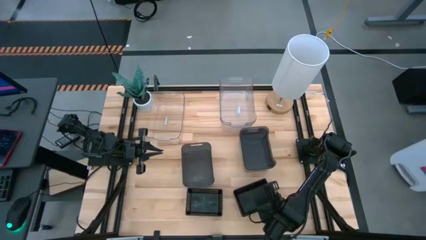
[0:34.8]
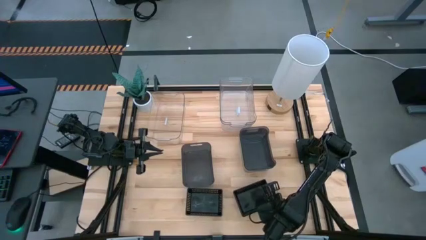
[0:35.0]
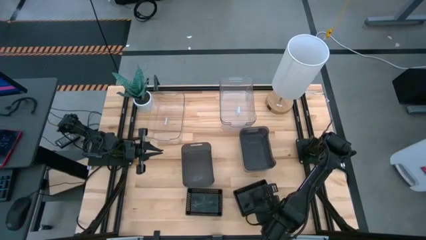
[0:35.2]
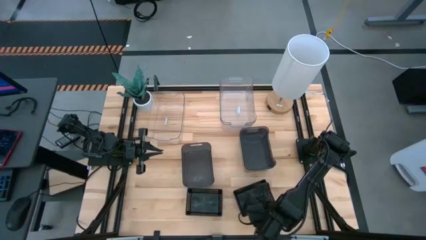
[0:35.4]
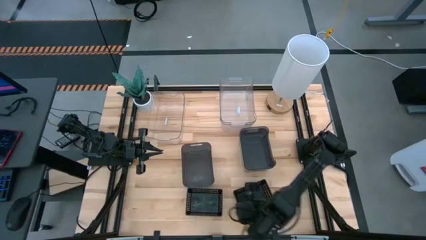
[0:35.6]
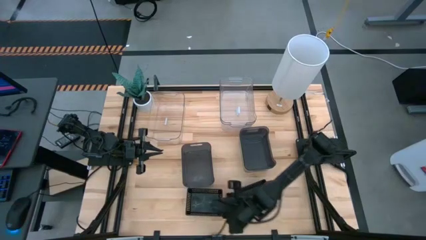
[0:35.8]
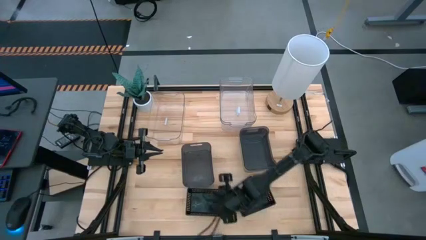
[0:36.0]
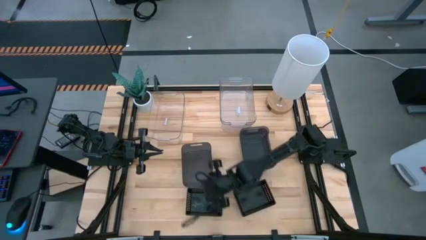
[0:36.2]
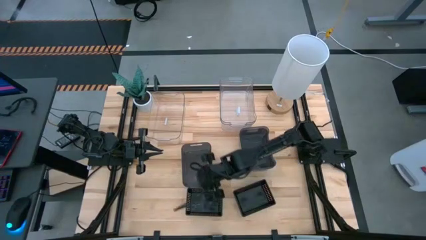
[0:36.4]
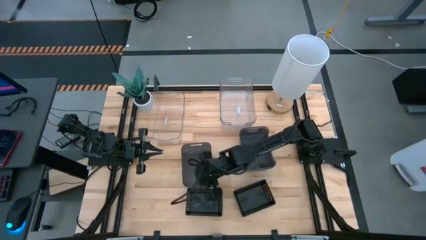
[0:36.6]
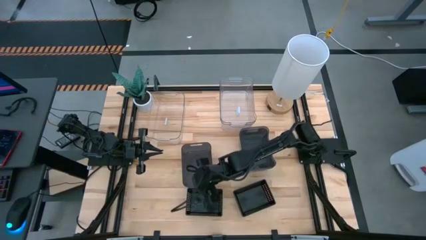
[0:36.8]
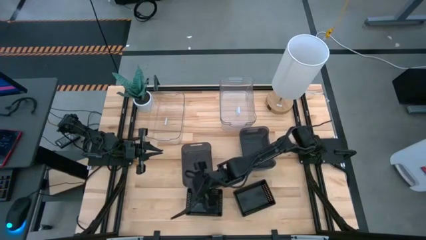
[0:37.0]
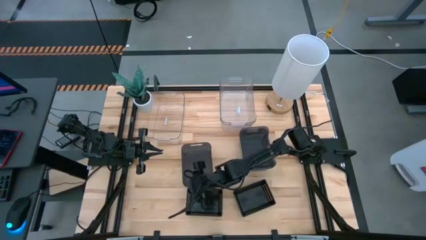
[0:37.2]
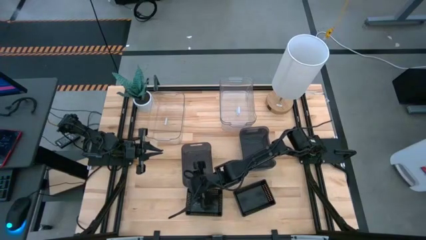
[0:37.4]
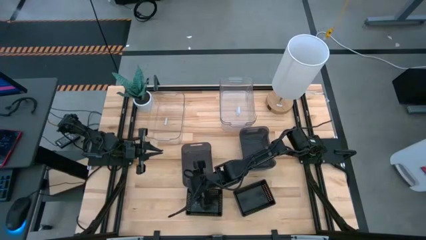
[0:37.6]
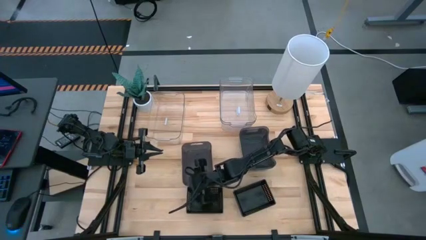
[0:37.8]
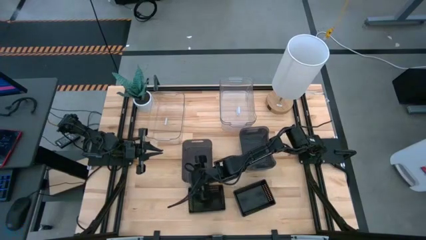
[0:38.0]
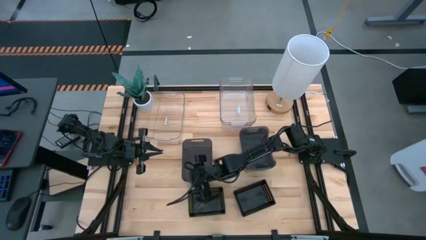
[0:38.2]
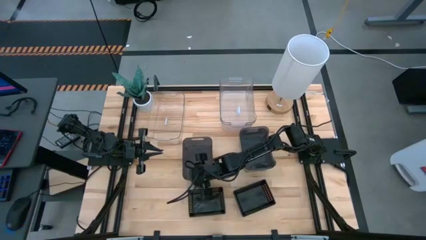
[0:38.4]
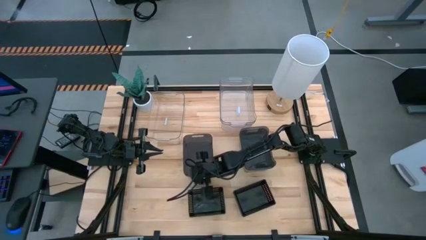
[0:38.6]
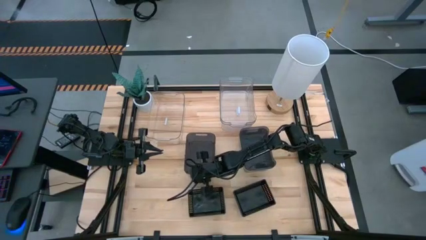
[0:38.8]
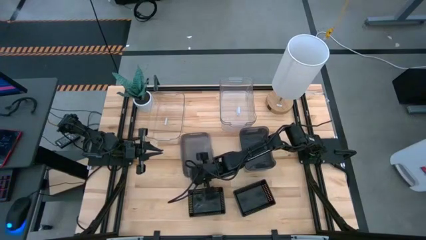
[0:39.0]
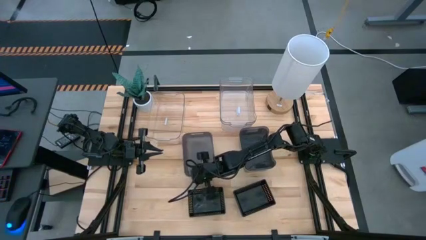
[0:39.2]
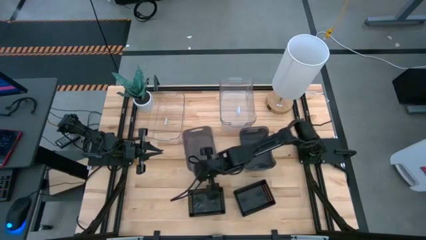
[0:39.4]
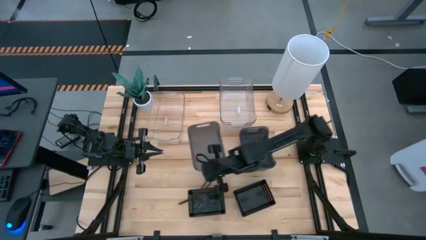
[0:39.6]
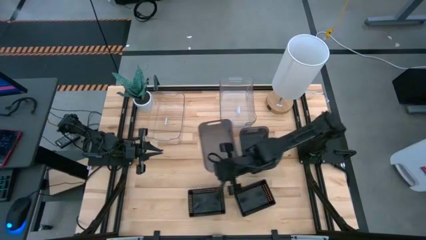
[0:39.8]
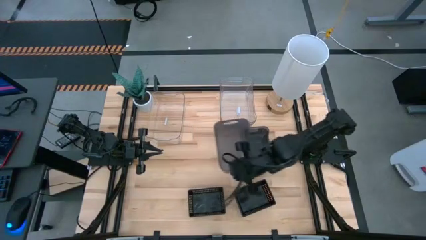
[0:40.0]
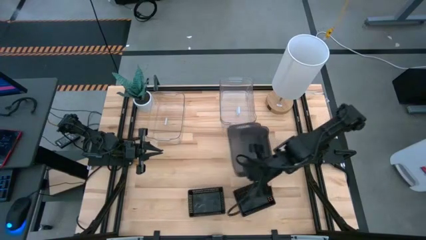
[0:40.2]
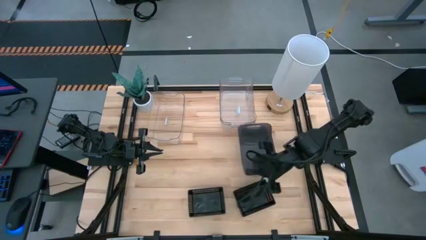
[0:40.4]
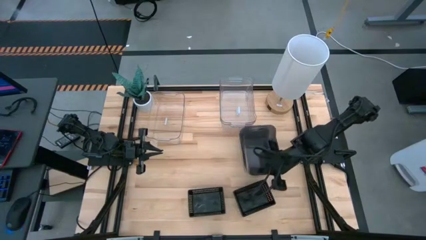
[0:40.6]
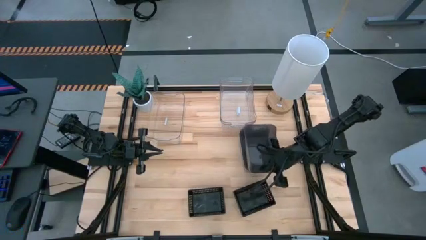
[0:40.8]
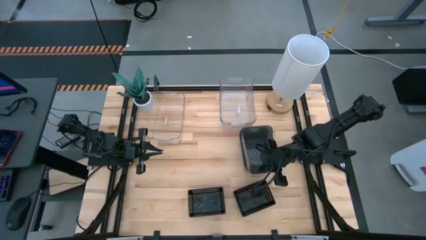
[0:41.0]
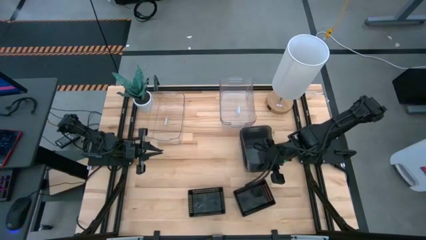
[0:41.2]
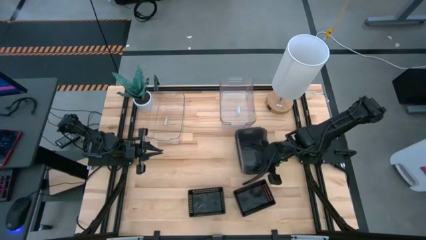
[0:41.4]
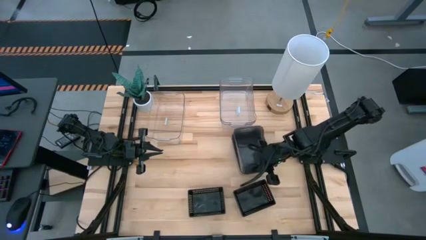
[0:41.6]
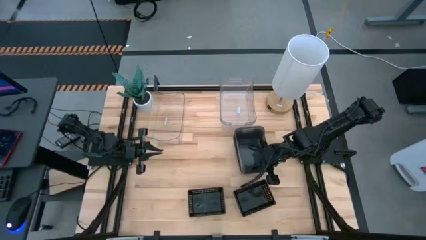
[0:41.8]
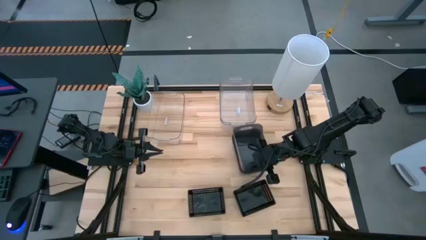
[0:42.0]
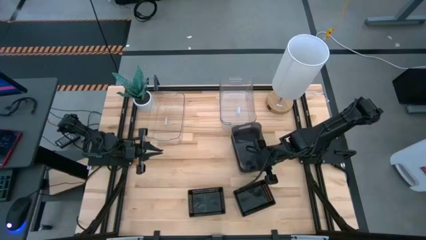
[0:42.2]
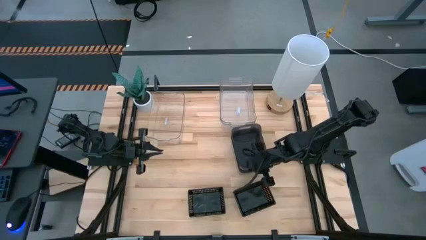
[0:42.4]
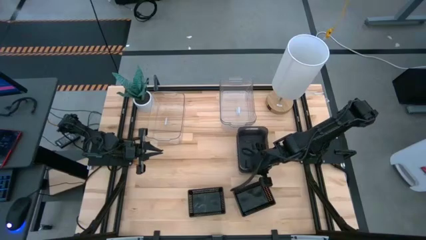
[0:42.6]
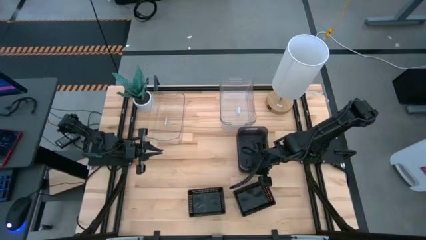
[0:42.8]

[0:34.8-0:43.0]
Stack the left gray bin on top of the right gray bin

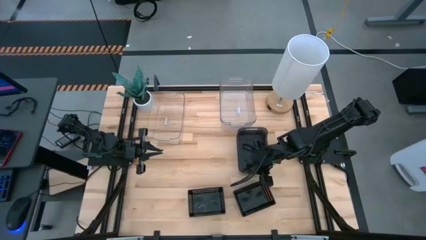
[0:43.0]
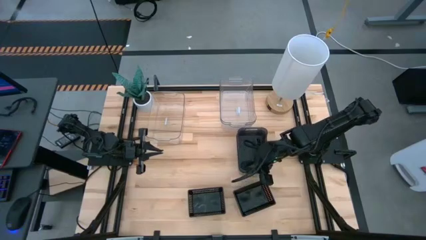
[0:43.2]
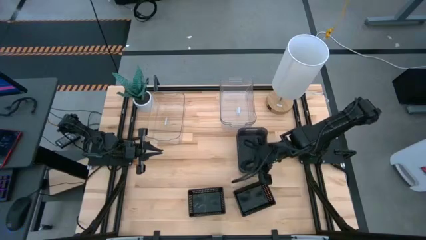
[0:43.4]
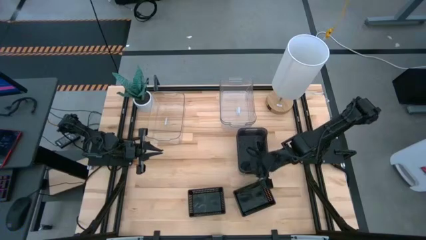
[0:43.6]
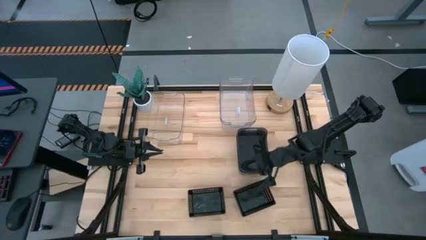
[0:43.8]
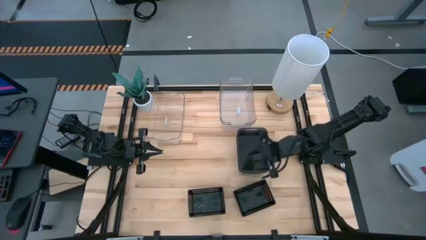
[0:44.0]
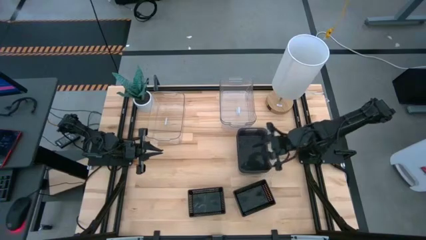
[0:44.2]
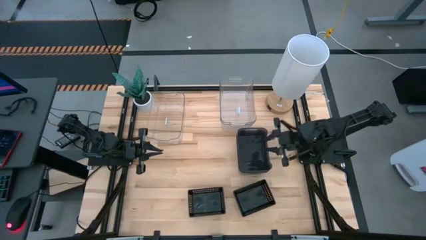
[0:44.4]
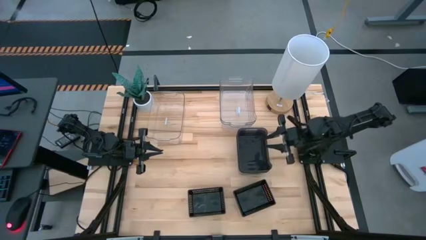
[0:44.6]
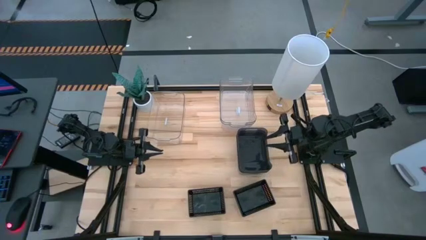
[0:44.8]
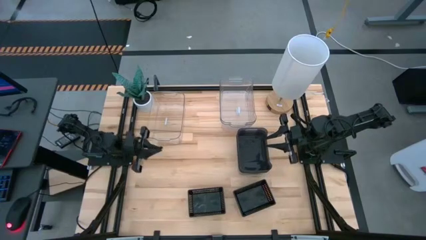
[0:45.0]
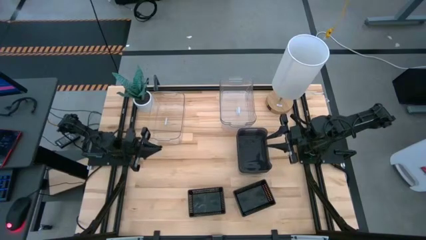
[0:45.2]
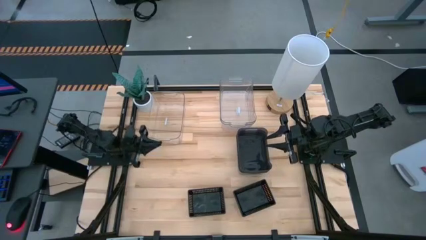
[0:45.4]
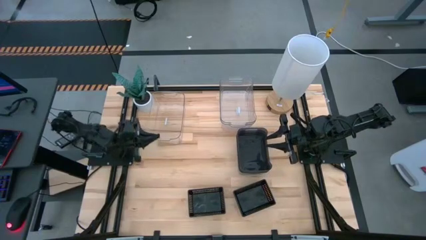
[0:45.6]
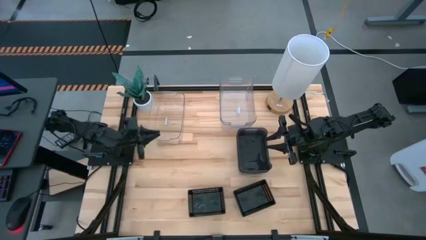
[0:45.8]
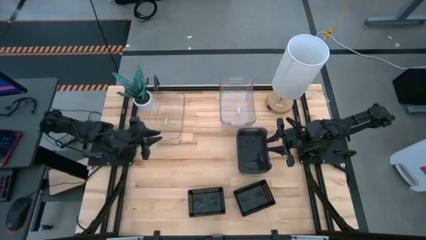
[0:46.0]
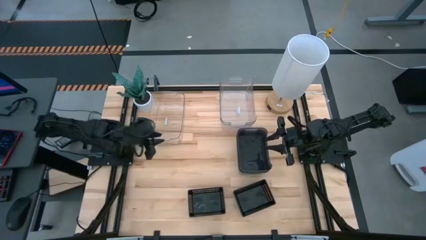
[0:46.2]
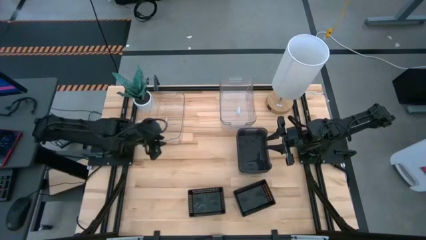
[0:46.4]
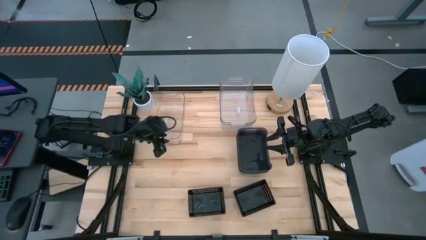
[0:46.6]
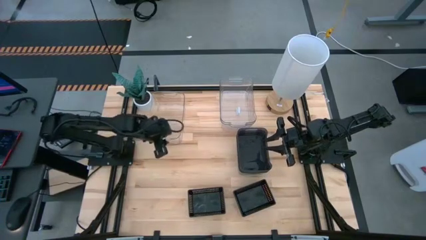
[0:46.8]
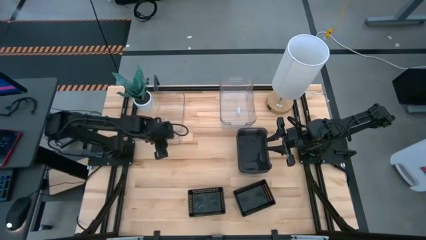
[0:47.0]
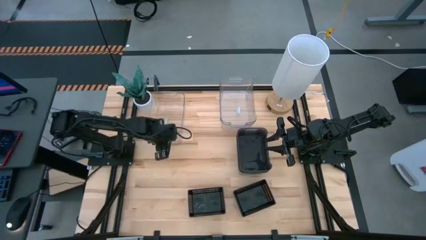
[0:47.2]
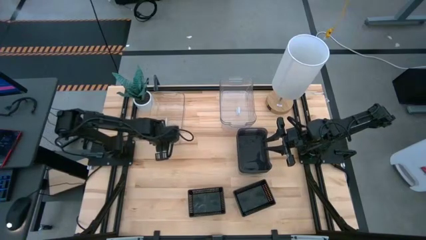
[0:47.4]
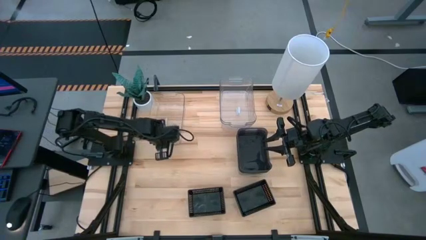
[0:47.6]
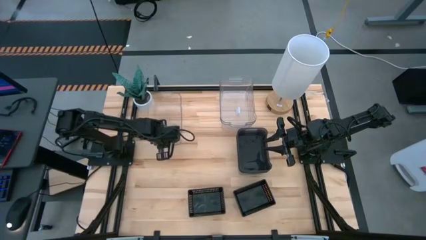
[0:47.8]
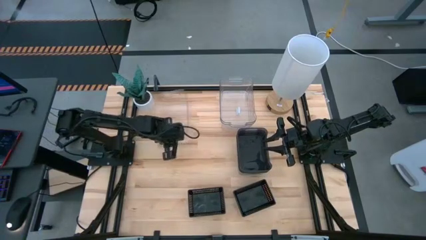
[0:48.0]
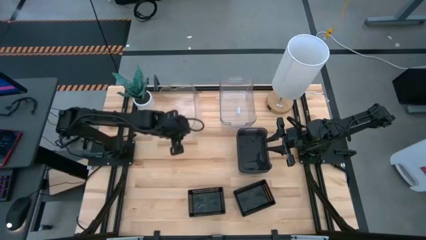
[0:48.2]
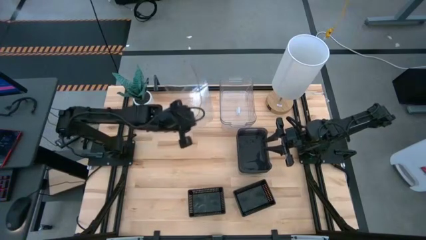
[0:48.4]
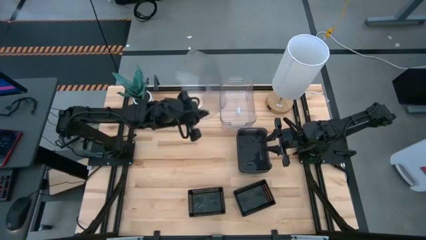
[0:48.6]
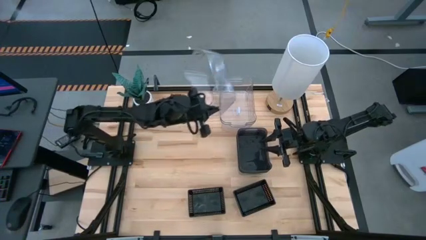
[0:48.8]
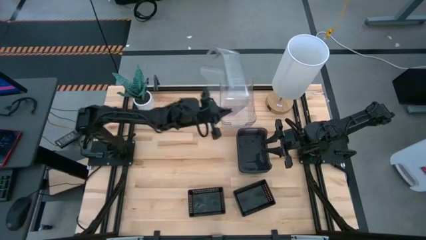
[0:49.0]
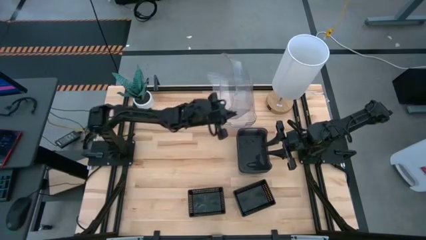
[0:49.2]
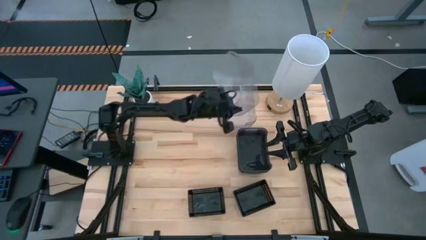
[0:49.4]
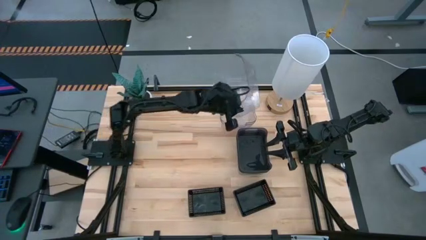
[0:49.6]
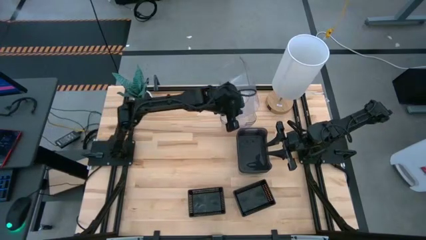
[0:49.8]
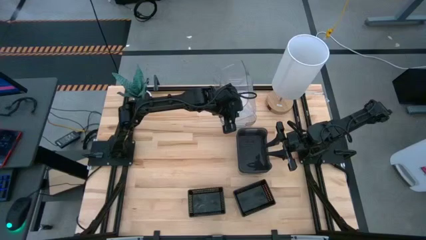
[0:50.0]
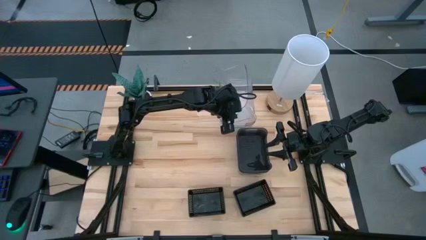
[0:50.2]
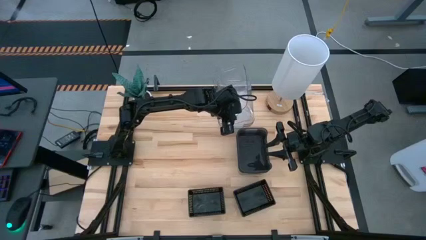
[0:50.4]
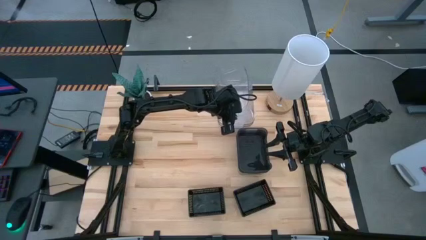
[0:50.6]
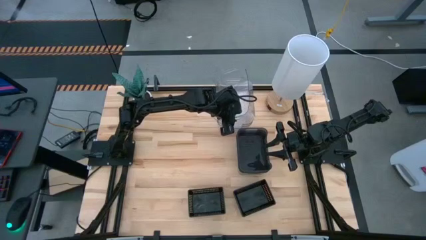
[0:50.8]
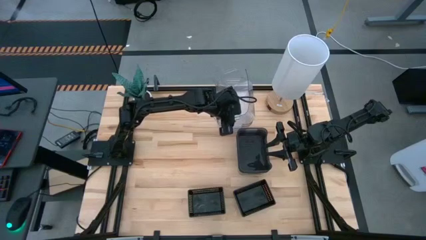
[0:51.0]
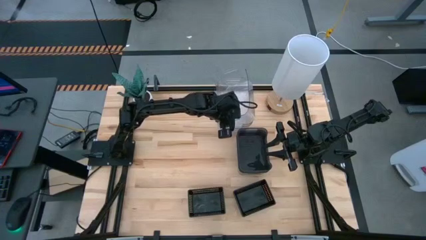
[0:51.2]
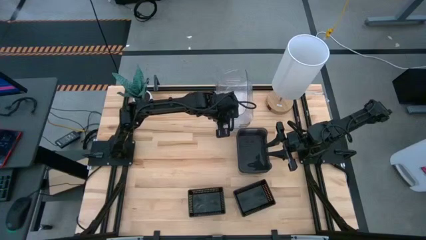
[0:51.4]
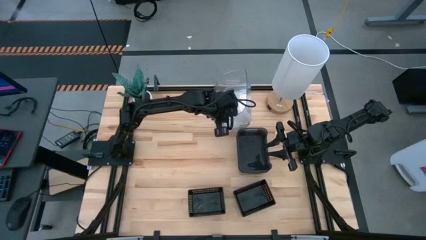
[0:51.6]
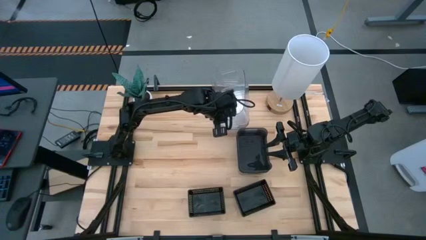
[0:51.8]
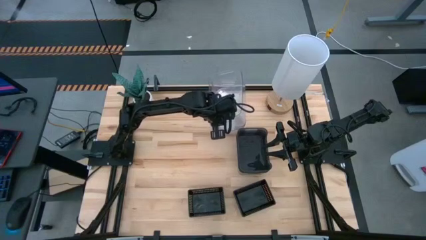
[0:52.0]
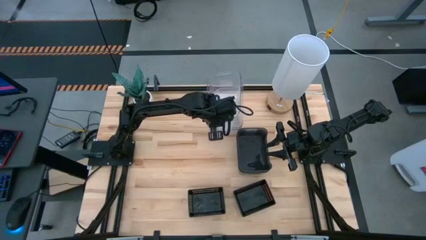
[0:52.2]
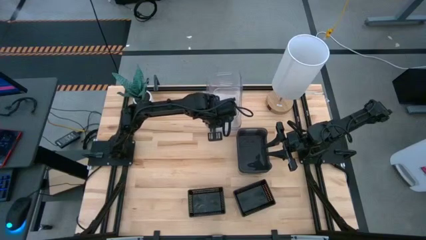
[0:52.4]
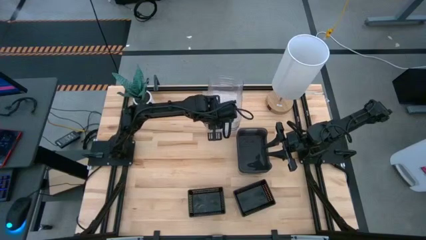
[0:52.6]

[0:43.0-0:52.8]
Stack the left transparent bin on top of the right transparent bin
